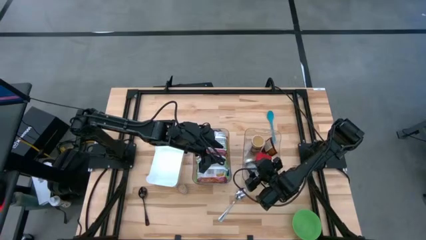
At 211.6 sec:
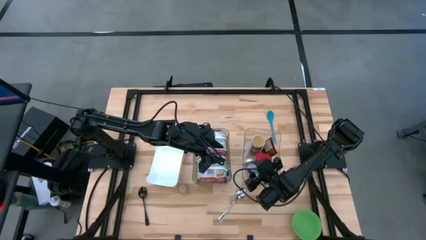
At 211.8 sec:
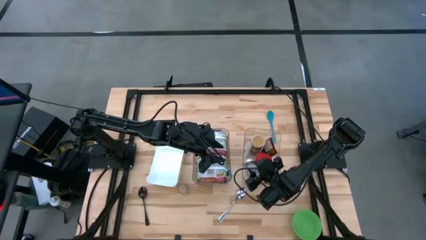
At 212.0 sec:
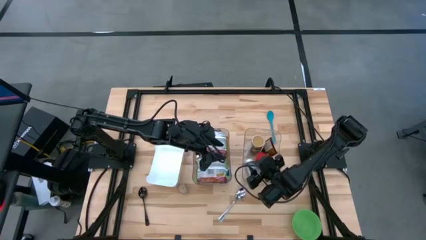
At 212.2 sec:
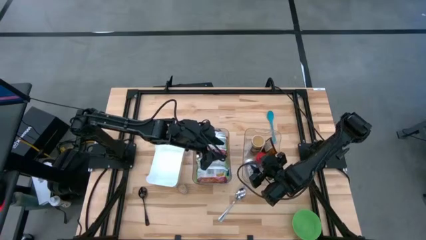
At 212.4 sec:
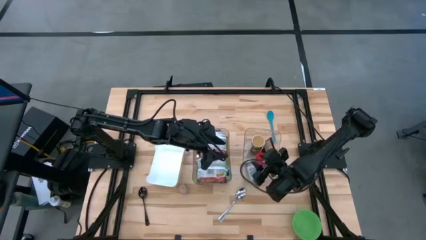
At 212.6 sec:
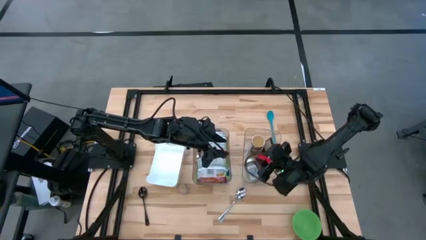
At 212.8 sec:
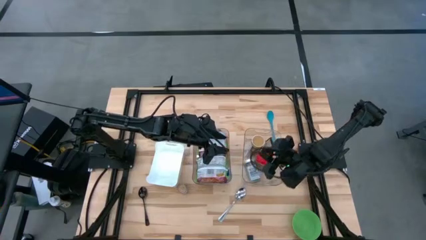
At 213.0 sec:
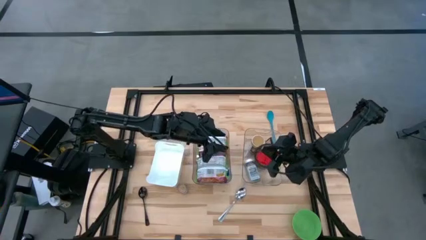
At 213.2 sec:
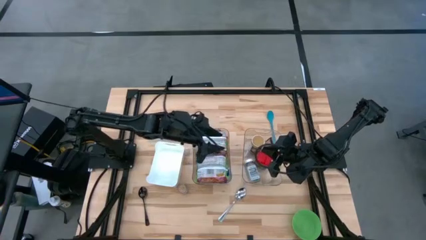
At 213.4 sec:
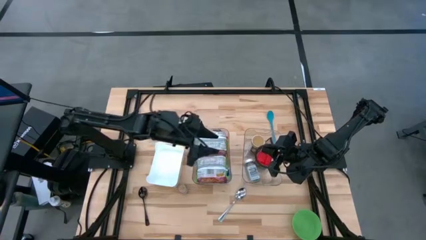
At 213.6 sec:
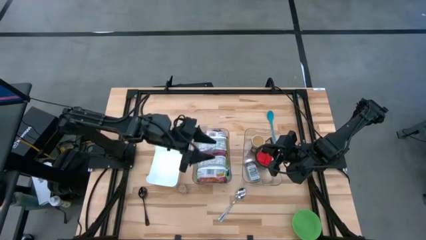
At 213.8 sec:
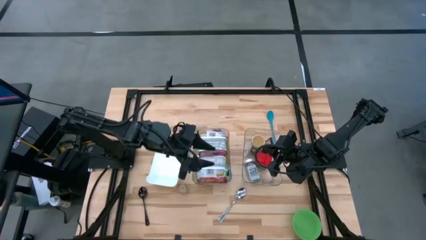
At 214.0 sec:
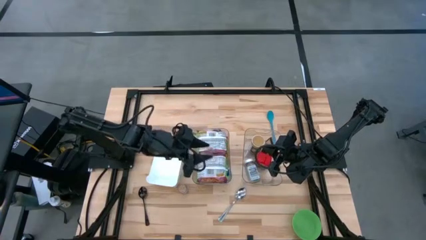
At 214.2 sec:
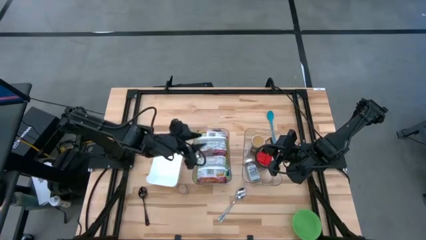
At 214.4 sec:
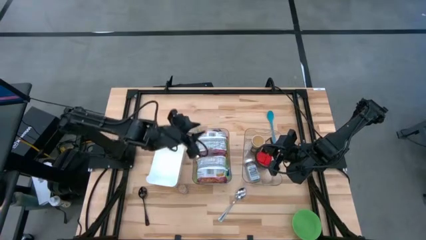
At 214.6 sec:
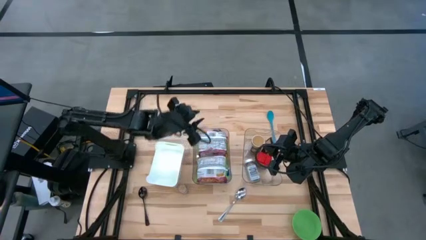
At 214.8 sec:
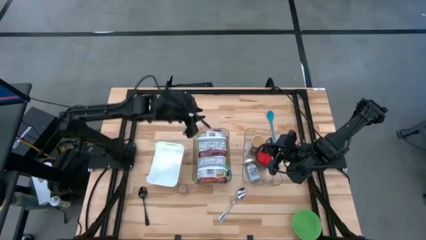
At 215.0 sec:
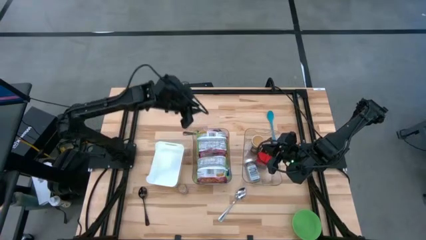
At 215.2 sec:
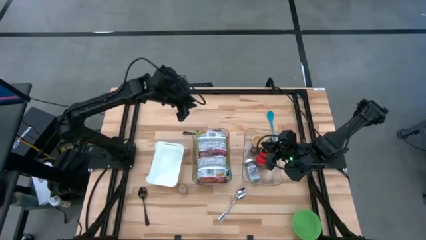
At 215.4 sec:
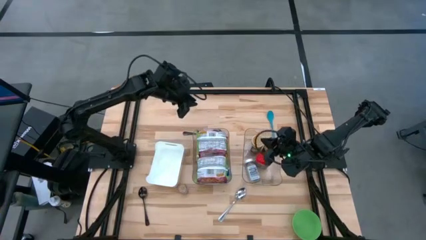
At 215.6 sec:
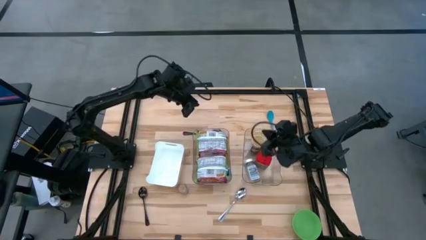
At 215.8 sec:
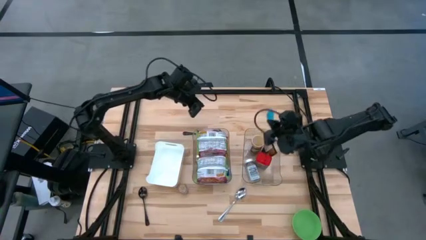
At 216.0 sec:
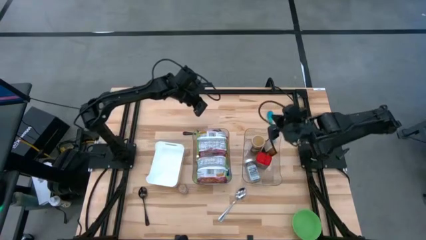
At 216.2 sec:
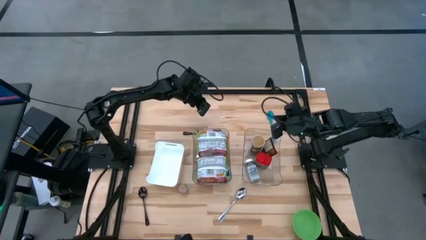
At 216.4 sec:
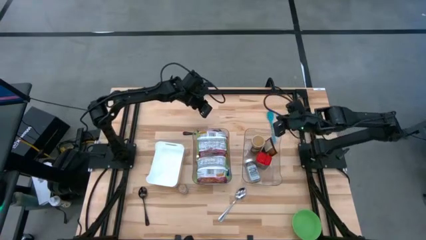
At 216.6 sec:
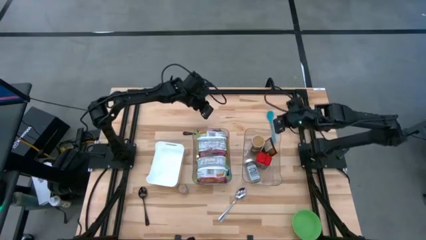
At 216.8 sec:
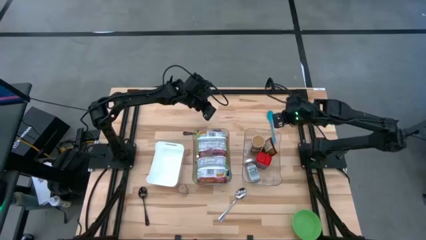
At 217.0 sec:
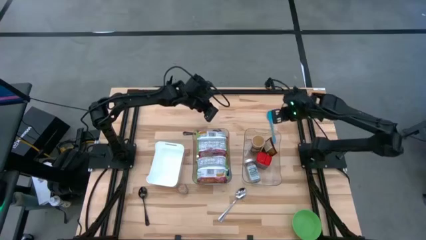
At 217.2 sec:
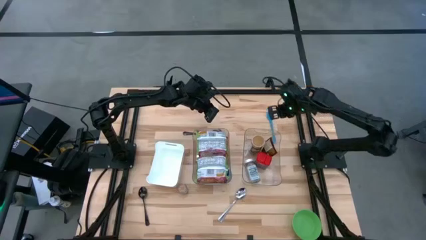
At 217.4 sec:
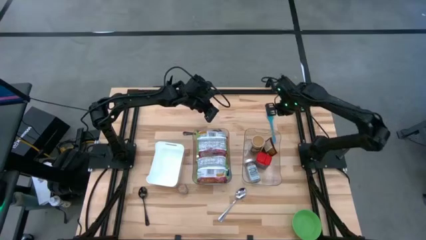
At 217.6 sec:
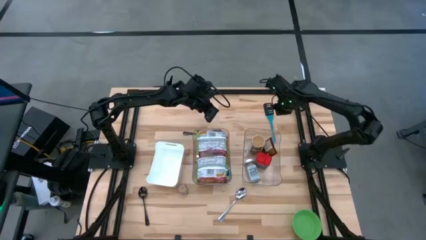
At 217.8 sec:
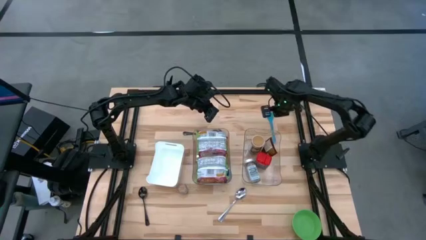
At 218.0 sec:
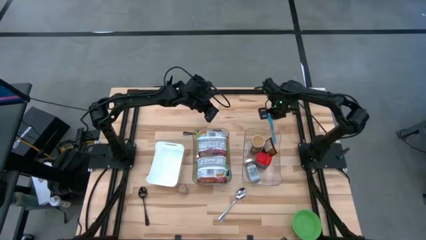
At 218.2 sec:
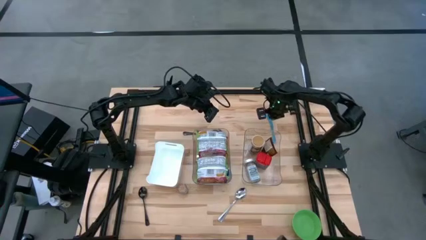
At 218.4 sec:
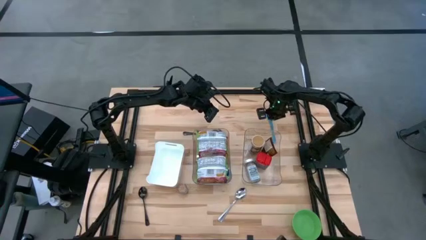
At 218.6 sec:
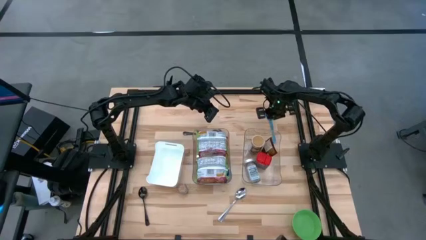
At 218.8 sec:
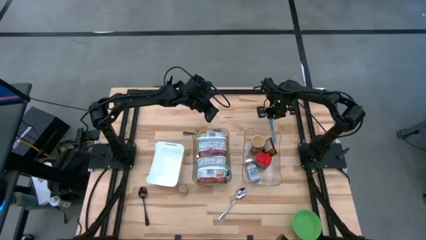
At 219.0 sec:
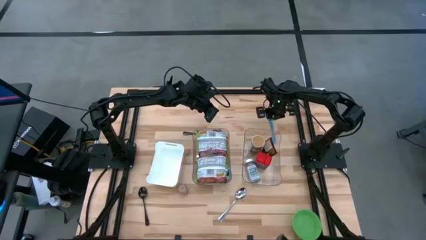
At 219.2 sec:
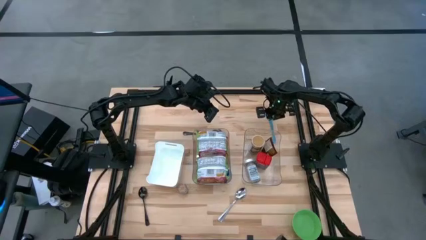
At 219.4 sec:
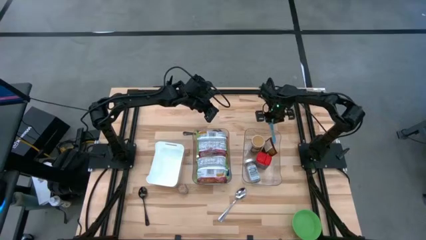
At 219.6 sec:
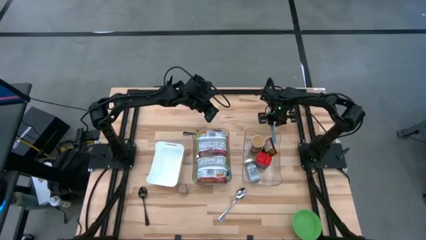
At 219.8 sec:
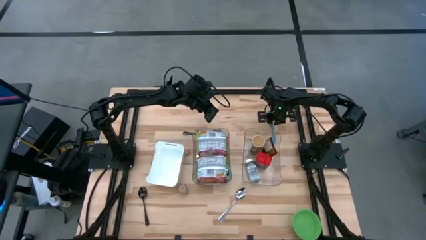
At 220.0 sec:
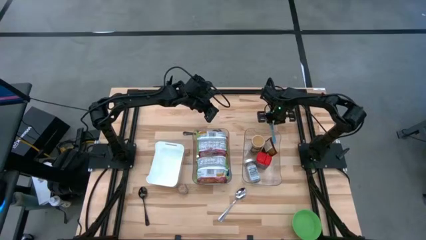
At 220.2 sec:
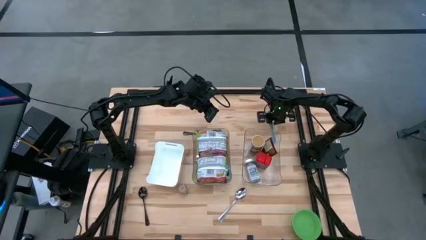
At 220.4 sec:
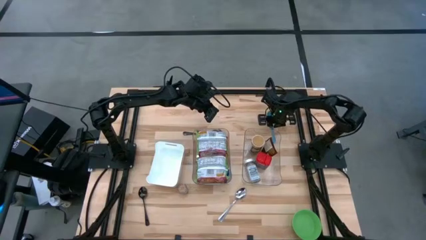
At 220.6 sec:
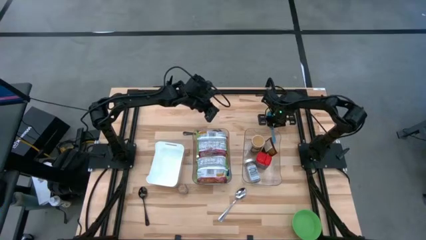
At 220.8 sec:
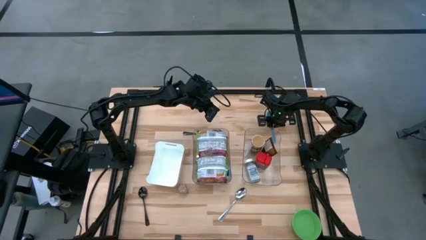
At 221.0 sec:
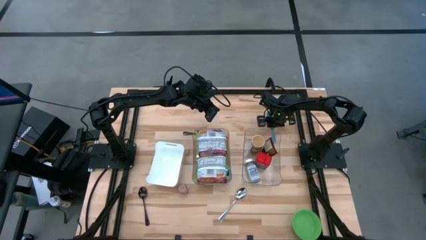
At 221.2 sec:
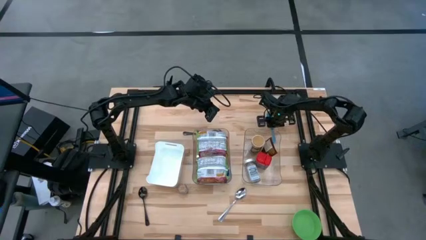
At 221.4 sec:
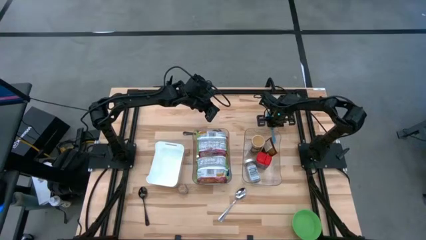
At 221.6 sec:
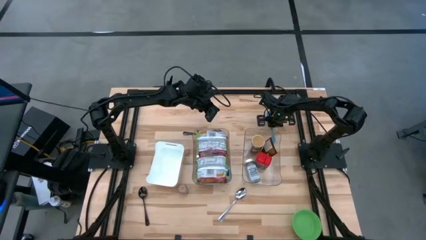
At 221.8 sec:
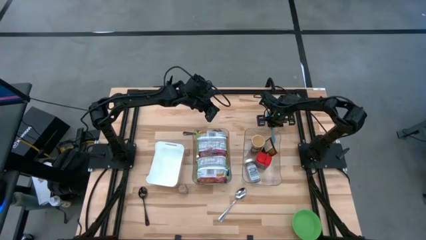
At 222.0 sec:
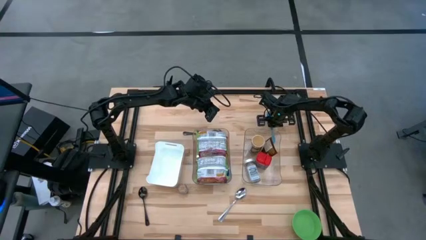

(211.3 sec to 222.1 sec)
Task: Pick & Place Food Item
Put the blue baby spoon into the white bin
